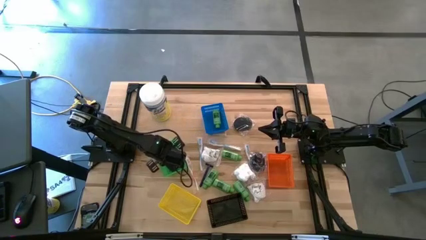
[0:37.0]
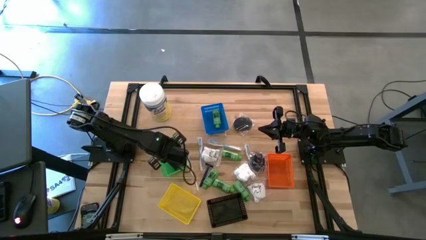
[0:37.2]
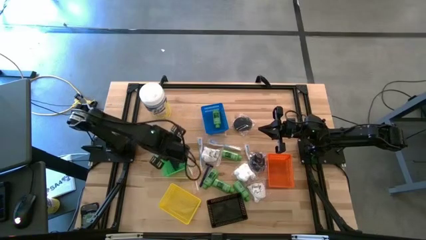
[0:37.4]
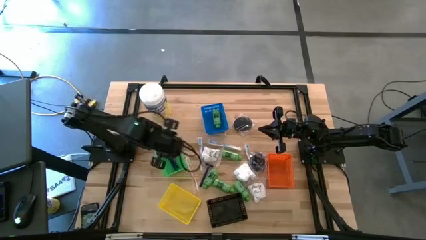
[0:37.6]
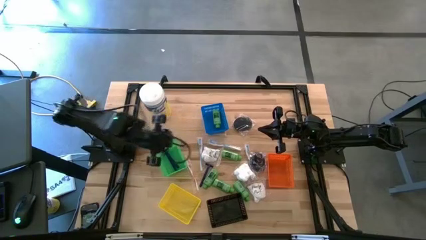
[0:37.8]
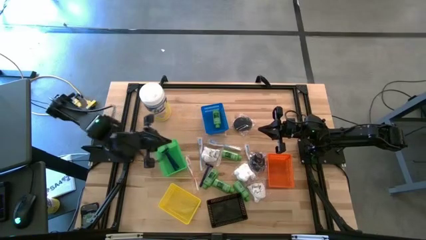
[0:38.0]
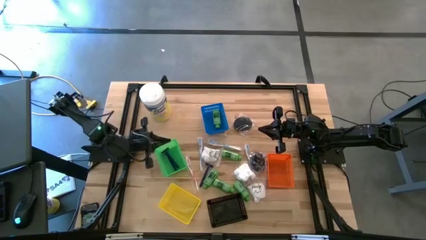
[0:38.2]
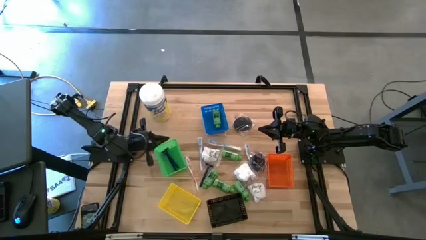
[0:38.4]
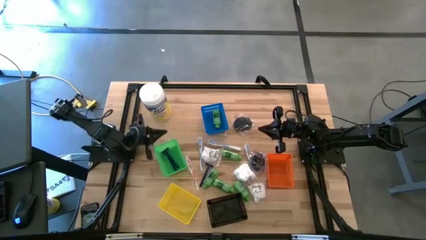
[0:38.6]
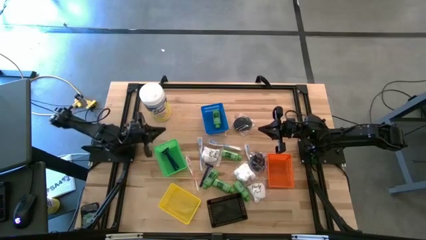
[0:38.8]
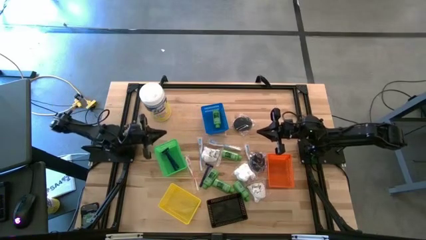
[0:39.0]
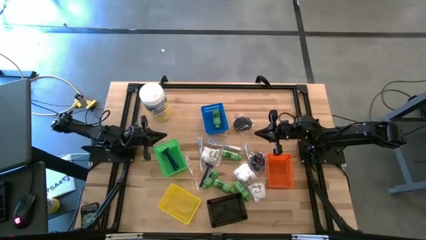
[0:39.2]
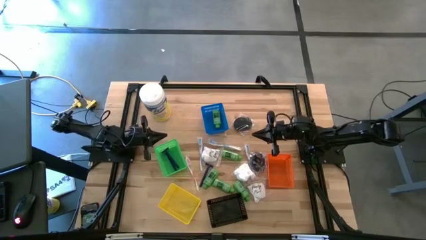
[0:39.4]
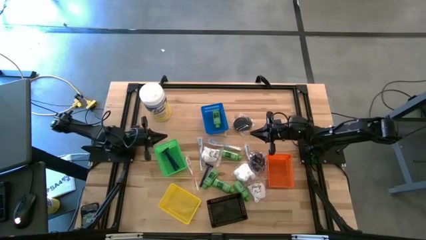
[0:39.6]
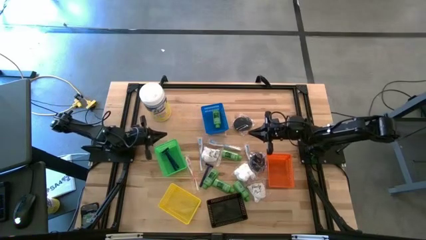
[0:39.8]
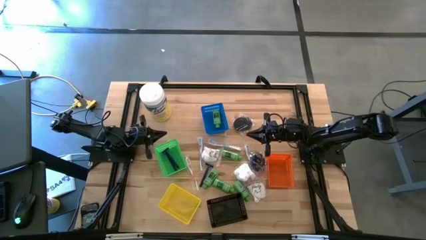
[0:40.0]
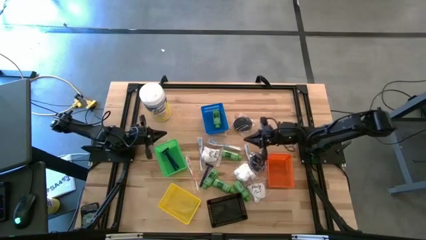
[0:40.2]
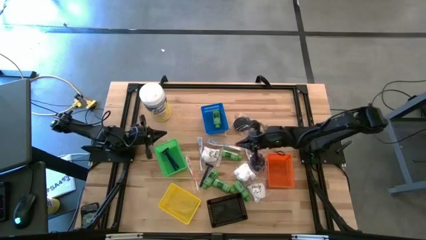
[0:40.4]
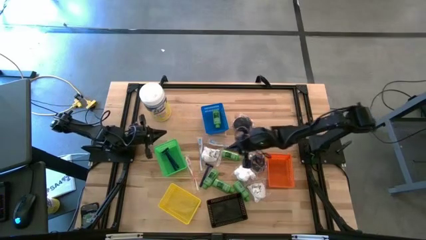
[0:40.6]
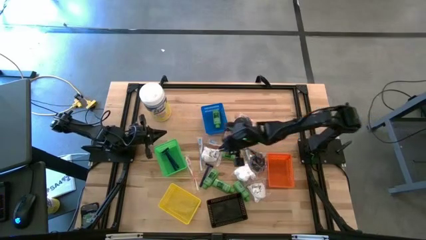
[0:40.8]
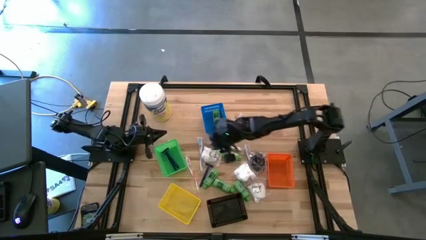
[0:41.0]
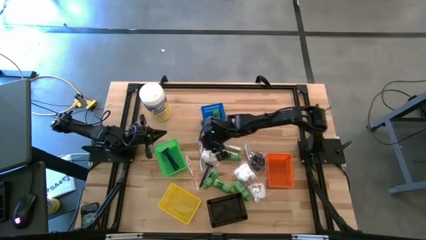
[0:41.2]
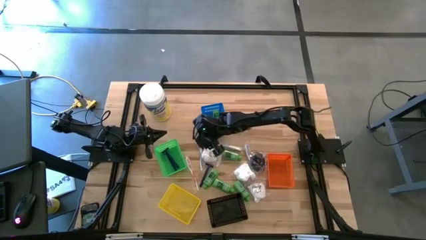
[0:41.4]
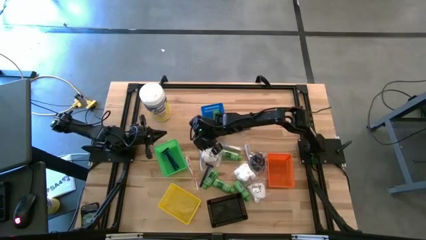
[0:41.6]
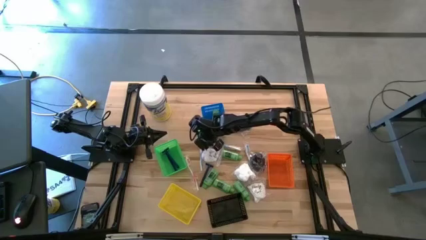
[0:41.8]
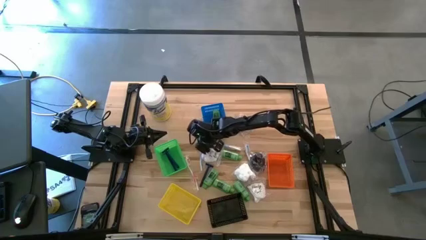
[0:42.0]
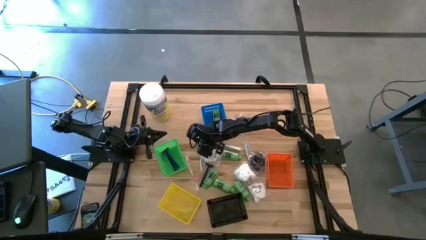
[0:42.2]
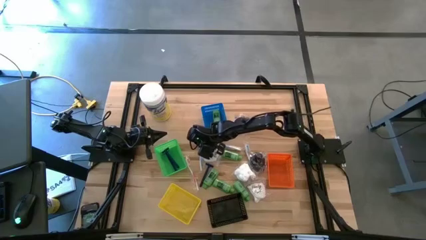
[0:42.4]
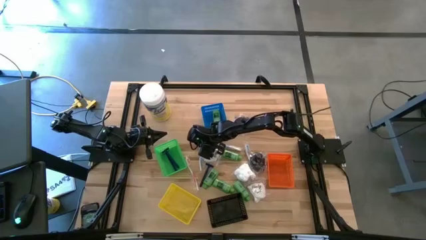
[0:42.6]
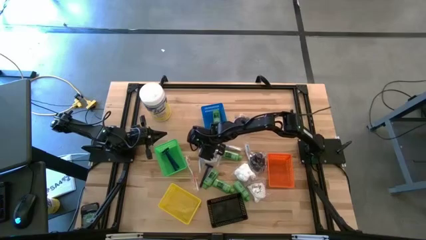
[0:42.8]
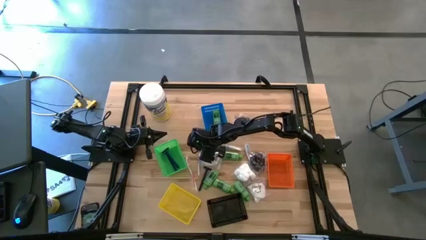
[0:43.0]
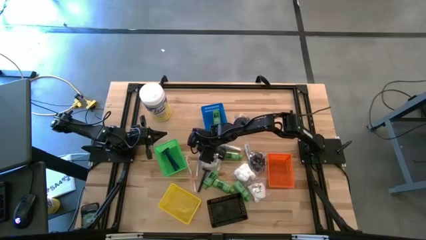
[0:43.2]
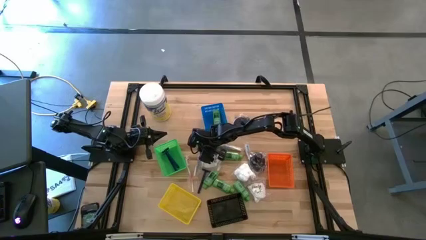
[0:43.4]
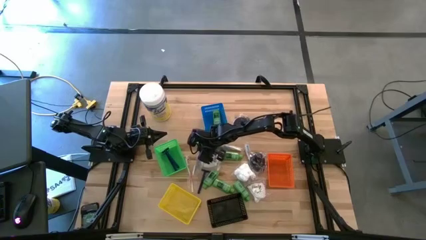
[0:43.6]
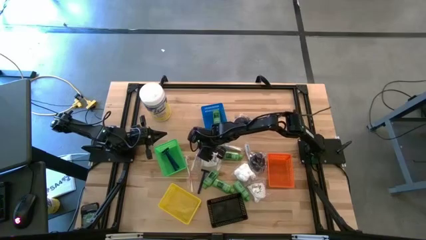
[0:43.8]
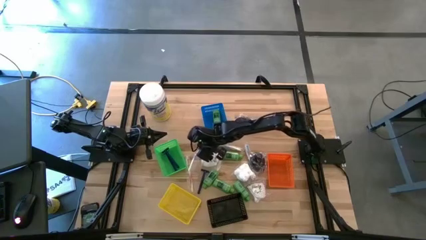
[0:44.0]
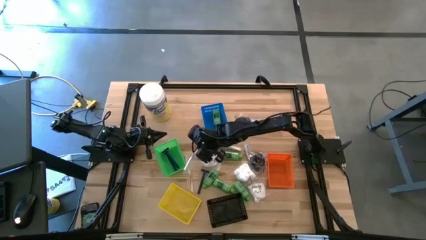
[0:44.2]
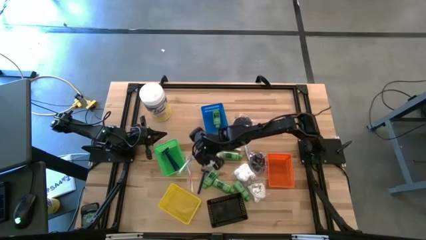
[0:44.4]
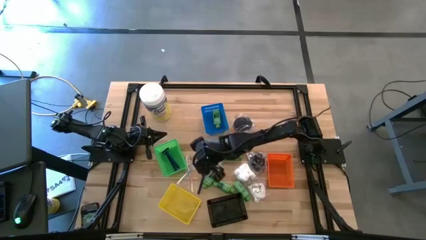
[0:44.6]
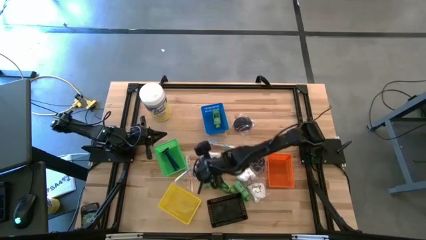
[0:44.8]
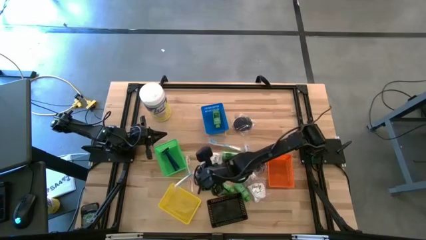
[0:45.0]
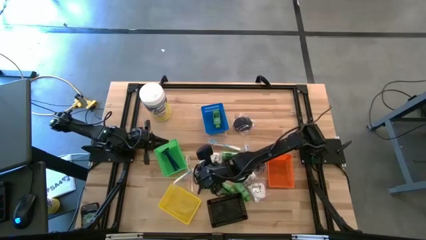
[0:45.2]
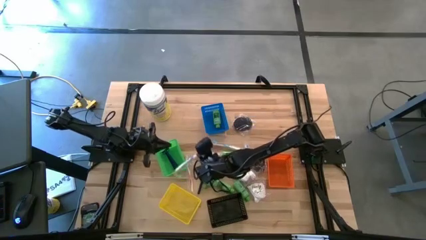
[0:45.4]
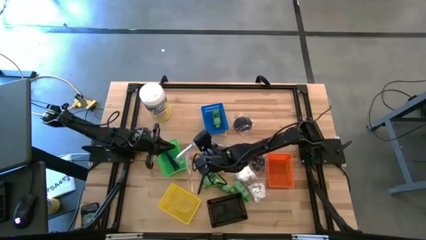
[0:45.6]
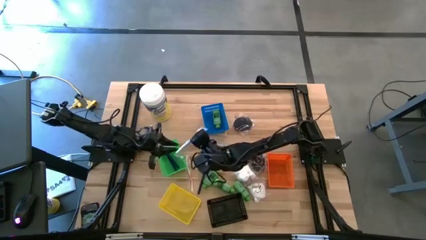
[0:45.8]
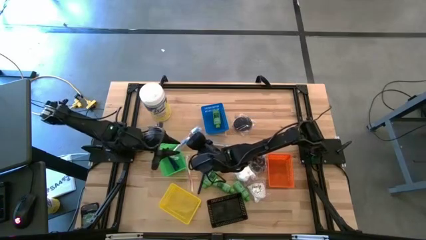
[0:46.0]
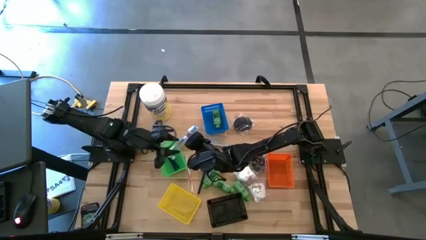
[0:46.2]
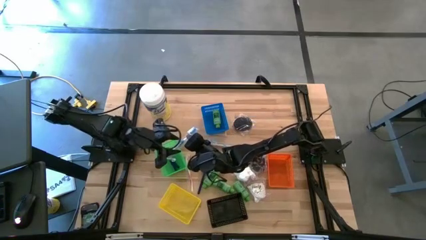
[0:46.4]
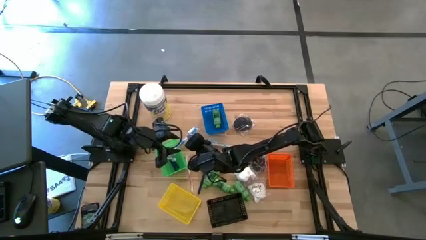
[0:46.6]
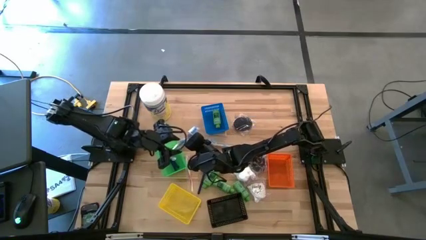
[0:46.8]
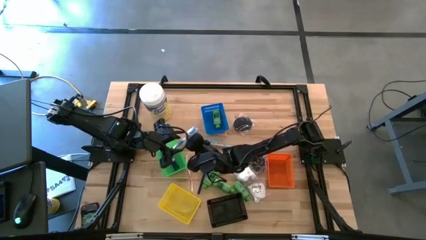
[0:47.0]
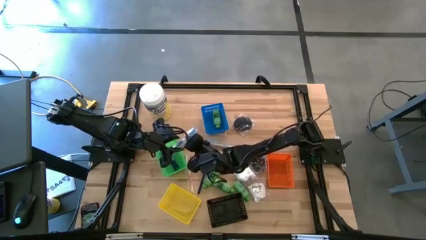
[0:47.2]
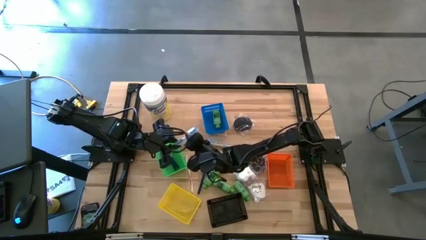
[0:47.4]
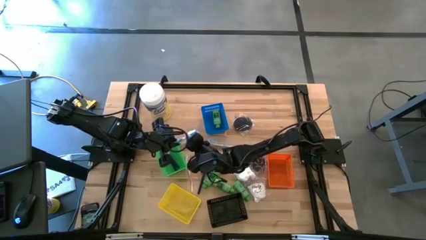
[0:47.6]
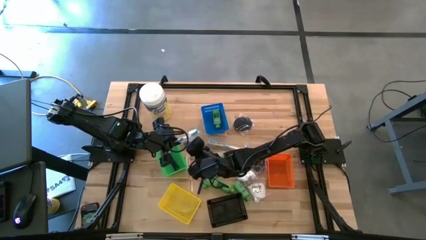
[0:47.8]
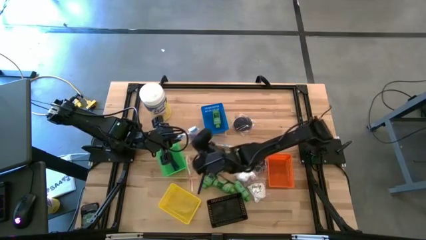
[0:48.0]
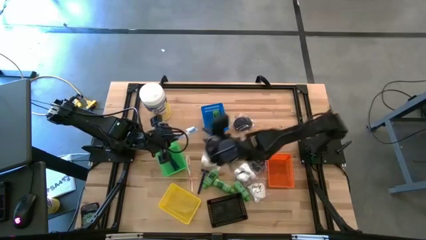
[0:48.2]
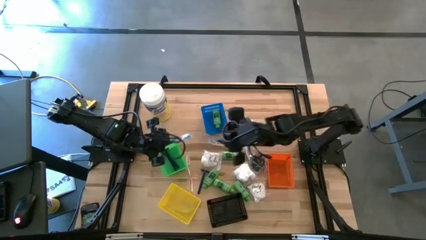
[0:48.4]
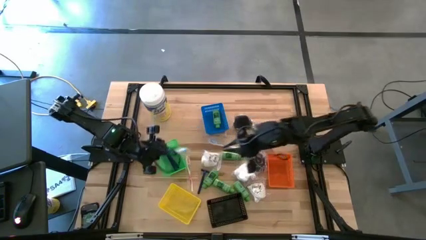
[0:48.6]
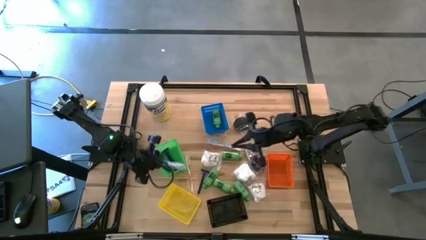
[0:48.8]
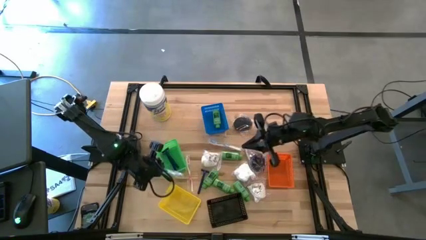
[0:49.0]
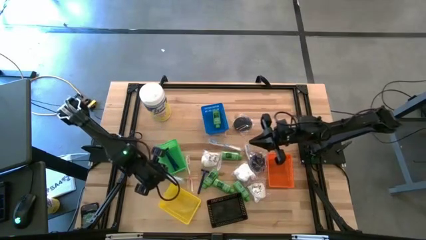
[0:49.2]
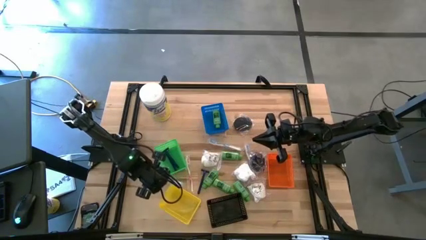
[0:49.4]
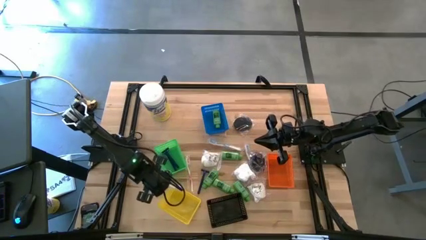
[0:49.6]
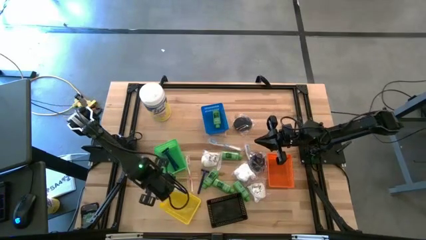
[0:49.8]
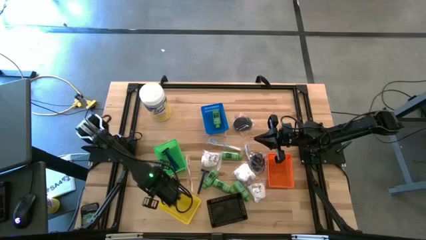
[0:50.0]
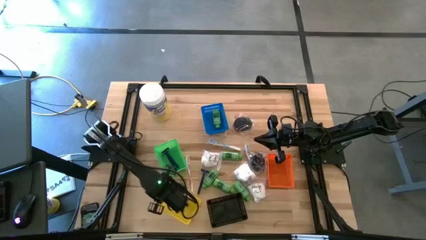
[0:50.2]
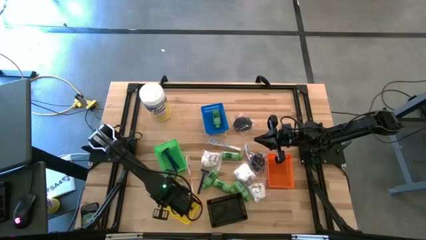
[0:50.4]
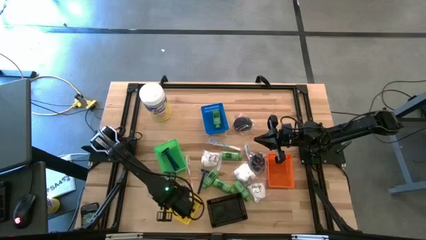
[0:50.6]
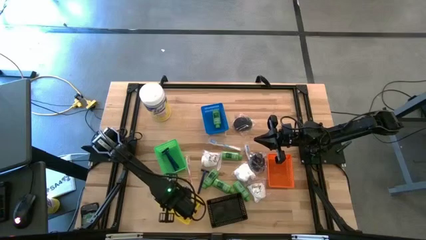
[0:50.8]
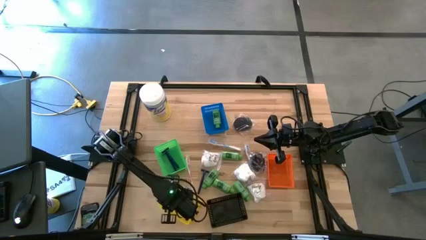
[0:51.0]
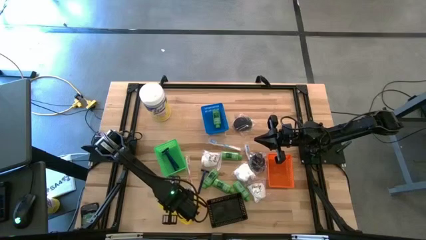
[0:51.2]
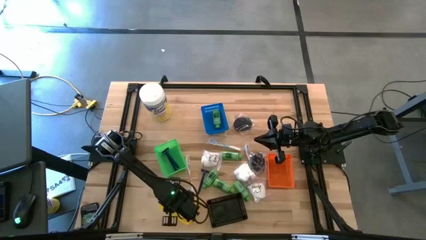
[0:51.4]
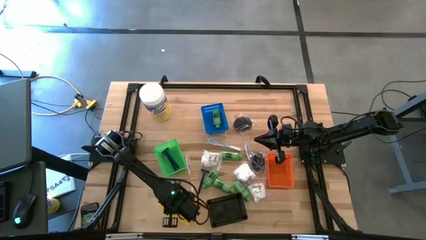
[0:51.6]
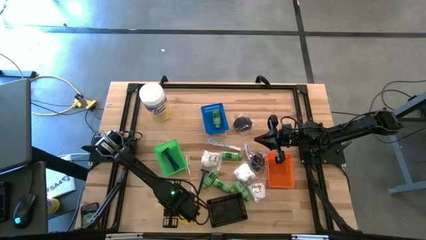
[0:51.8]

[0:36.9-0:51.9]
Task: Pick & Place Travel size toiletries
Put the blue toothbrush into the yellow bin

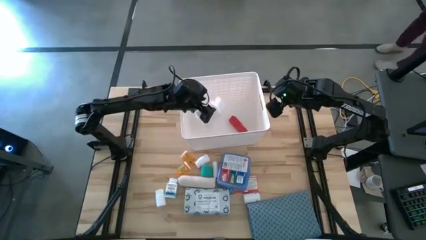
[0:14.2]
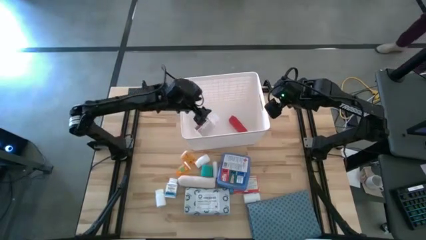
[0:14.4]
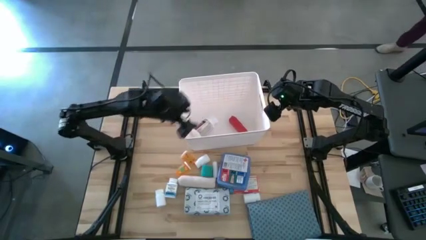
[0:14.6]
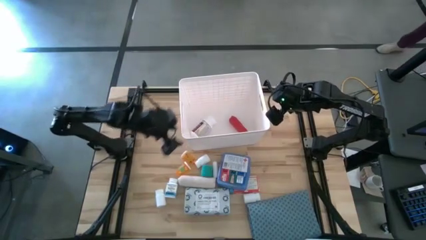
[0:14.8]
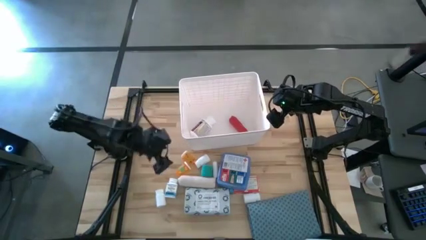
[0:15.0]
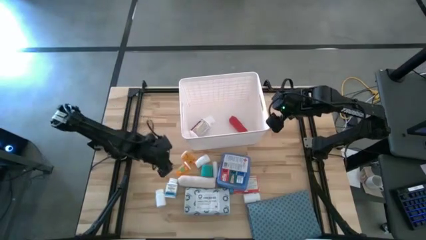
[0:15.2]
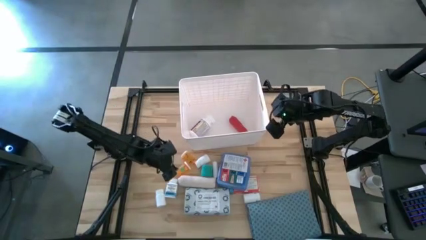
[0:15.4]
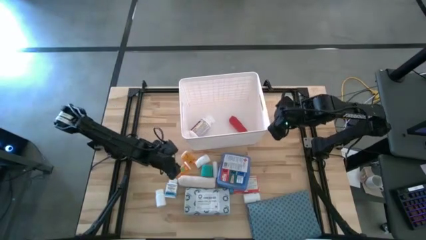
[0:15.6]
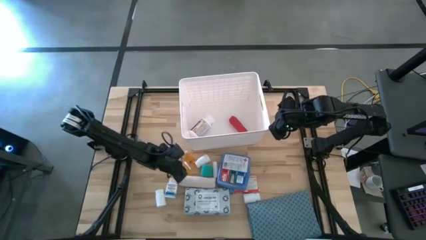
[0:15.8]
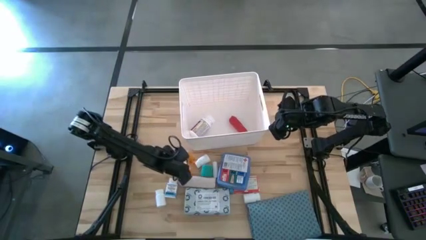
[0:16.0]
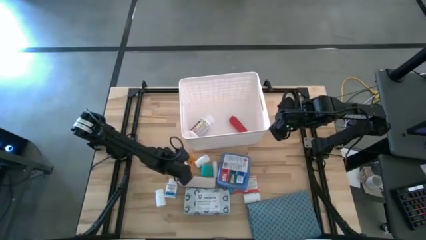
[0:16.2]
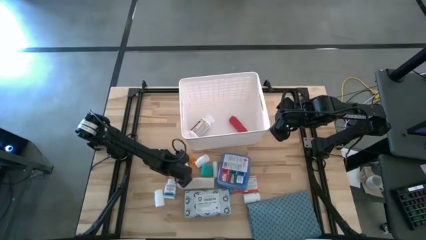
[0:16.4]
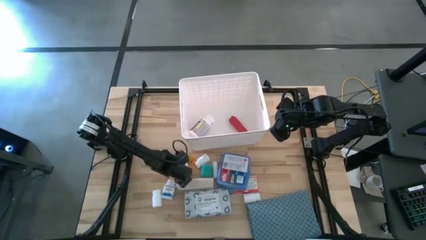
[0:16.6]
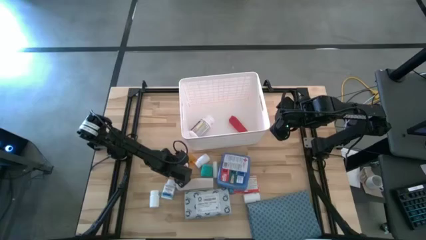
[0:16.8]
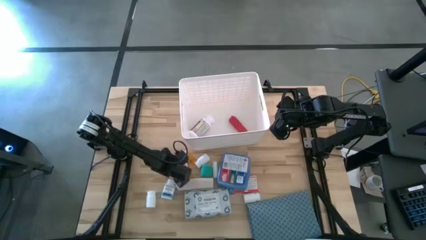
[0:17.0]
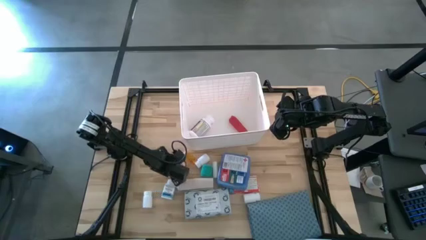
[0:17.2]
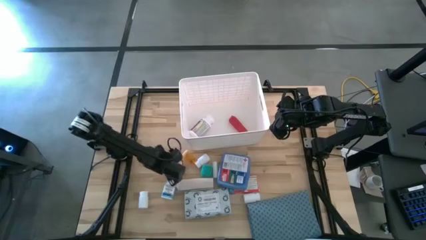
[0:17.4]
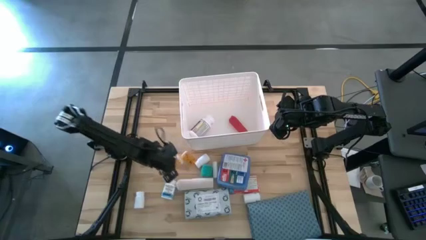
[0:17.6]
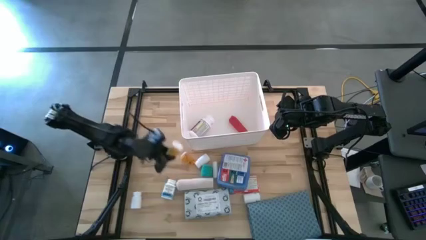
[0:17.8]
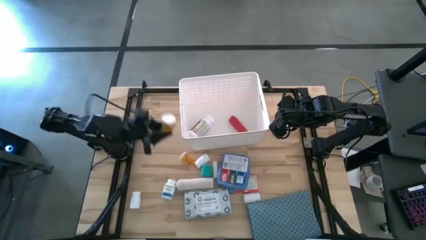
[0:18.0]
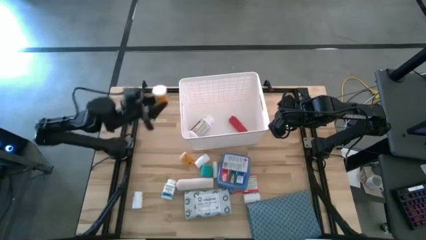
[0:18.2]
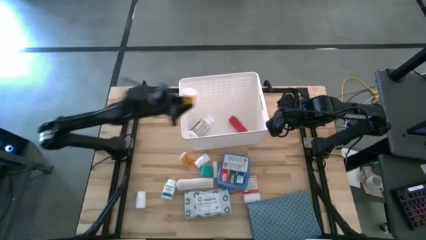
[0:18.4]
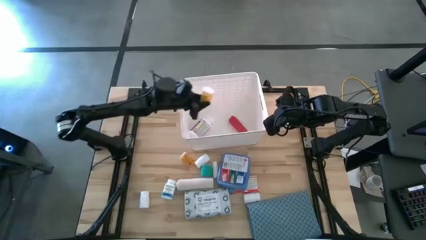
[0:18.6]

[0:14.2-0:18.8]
Task: Pick & place medical supplies in basket/bin
Put the bottom orange pill bottle into the white bin
